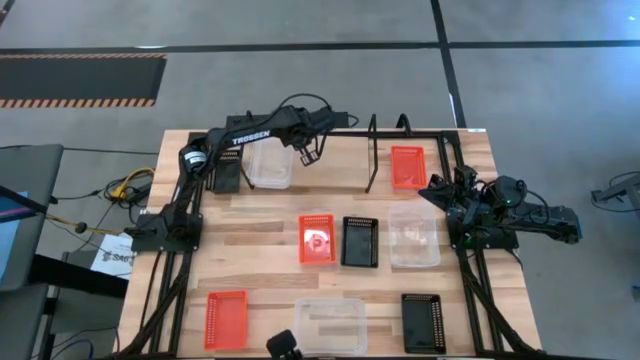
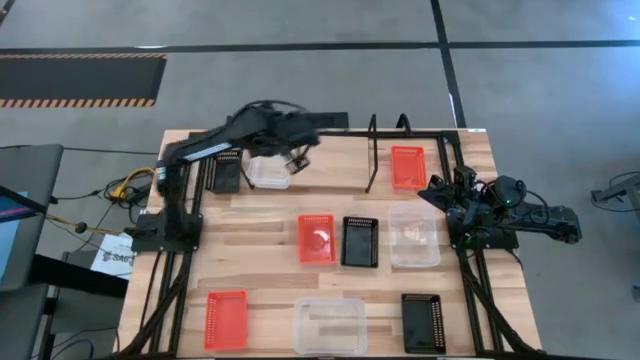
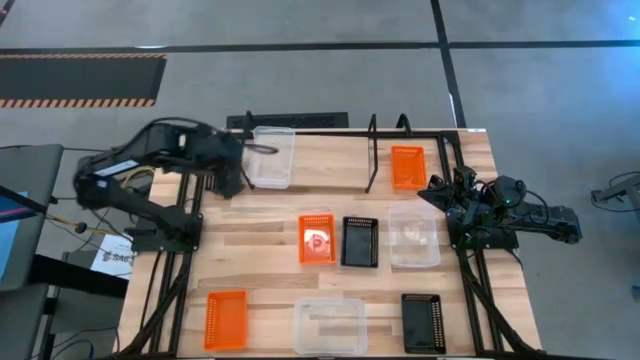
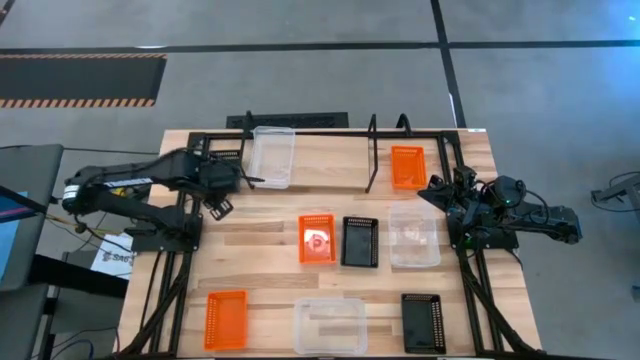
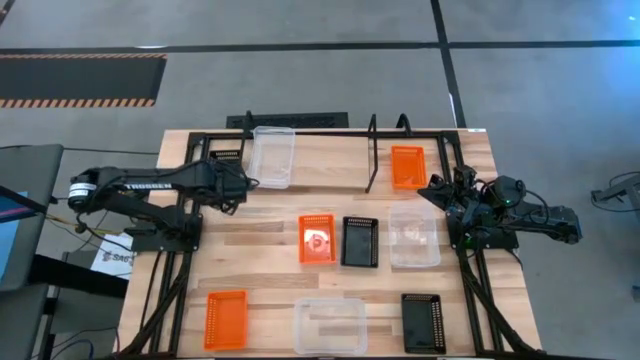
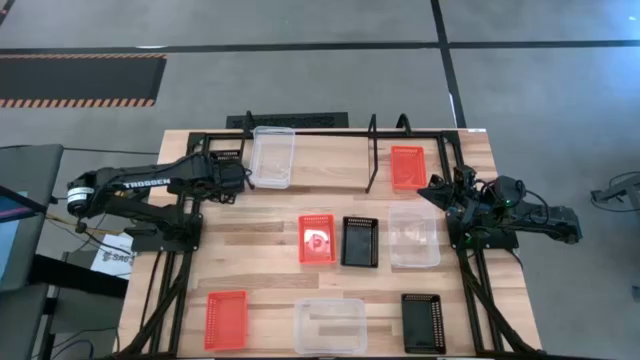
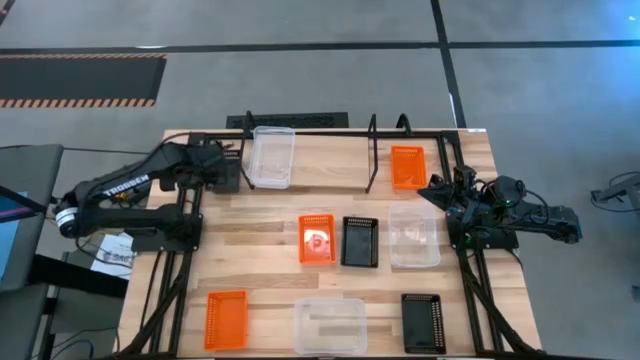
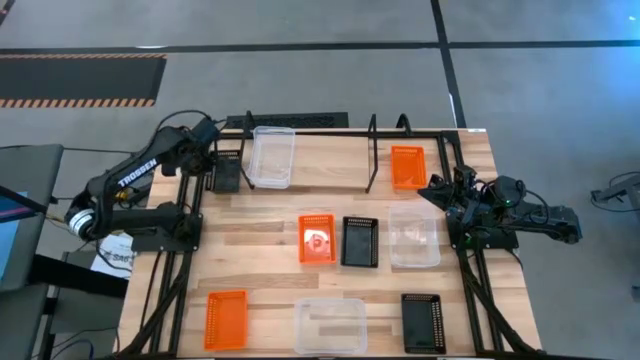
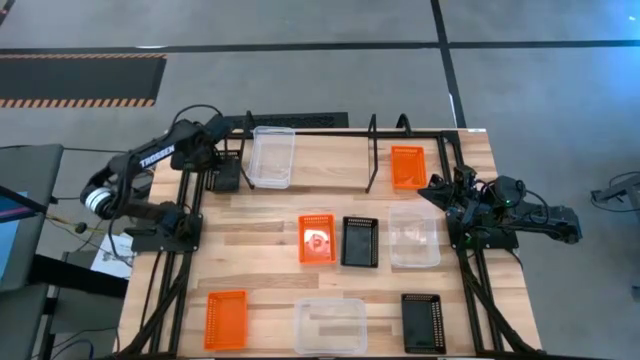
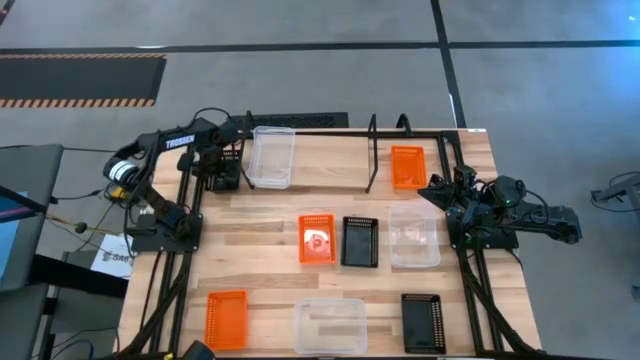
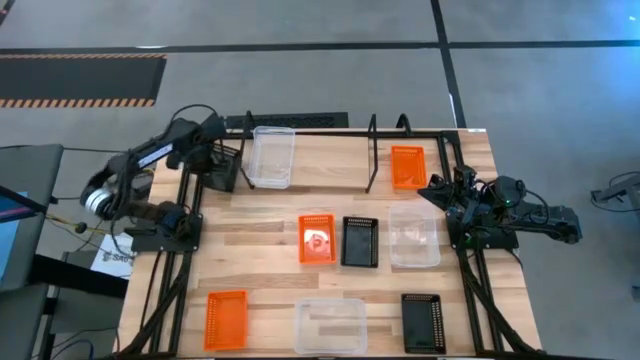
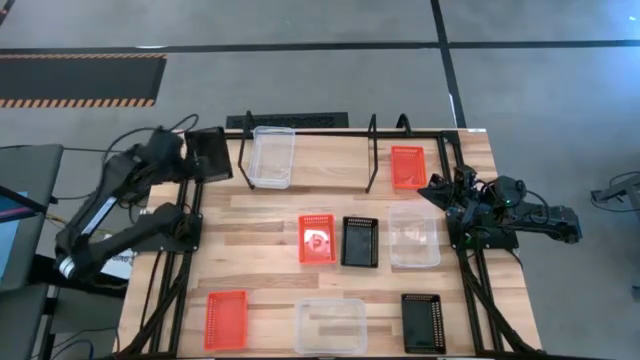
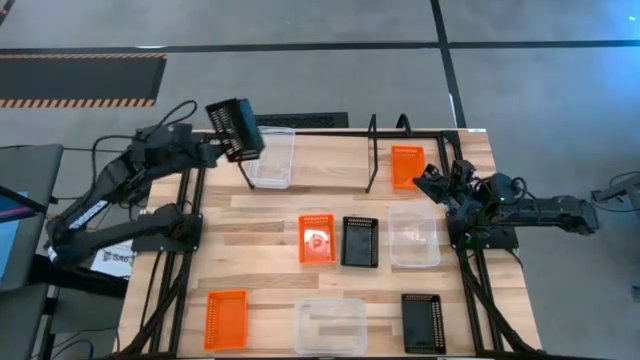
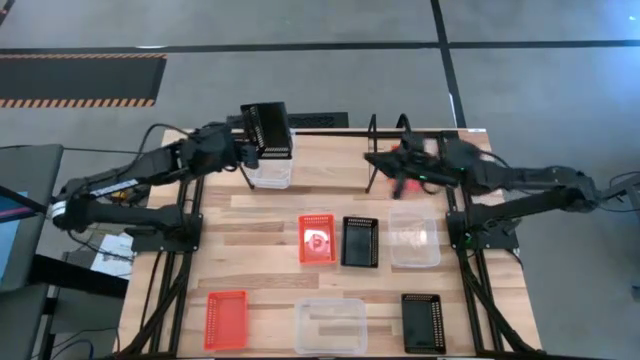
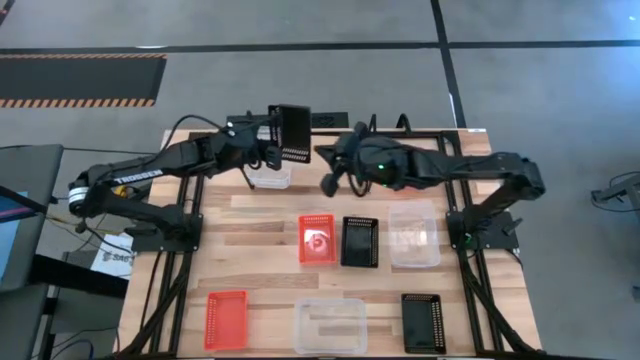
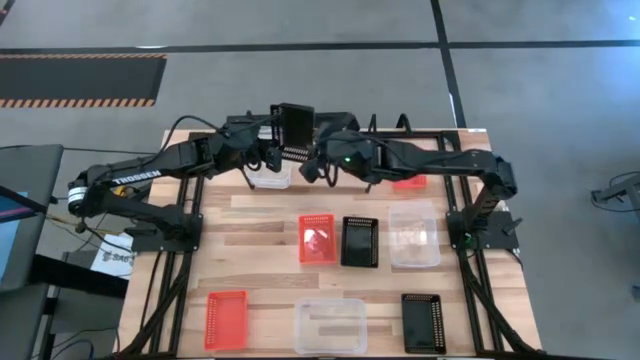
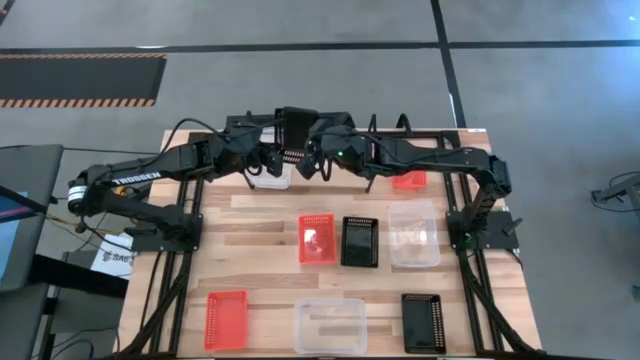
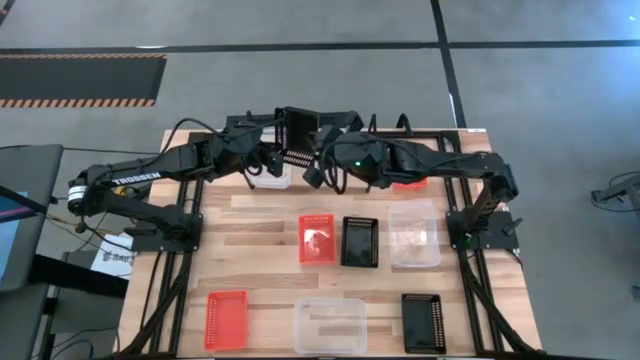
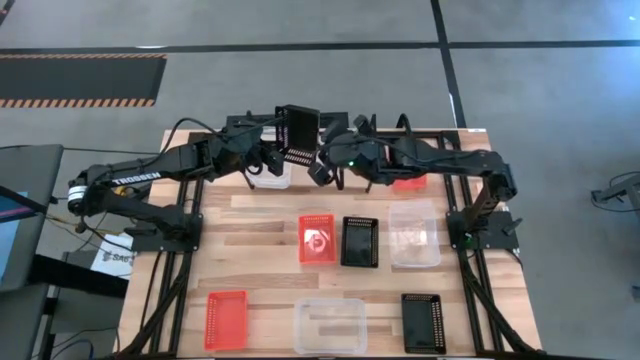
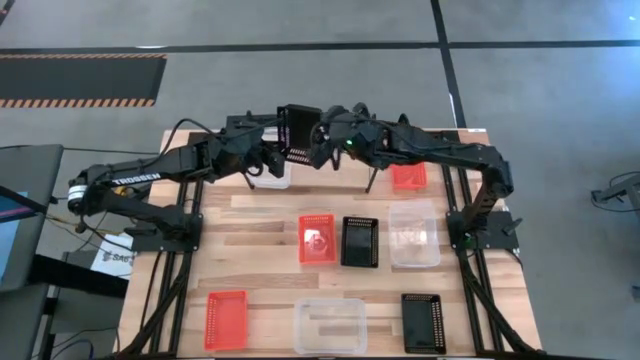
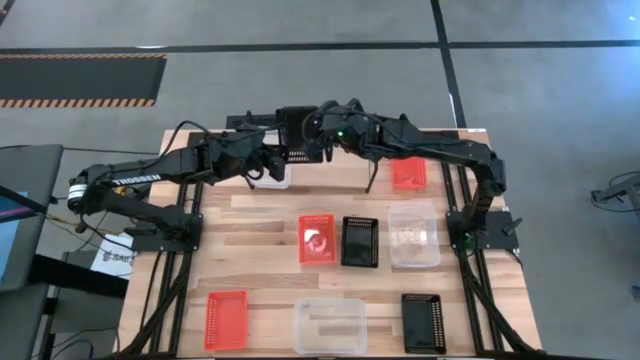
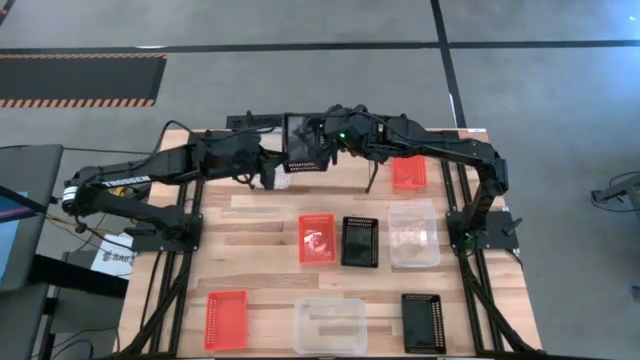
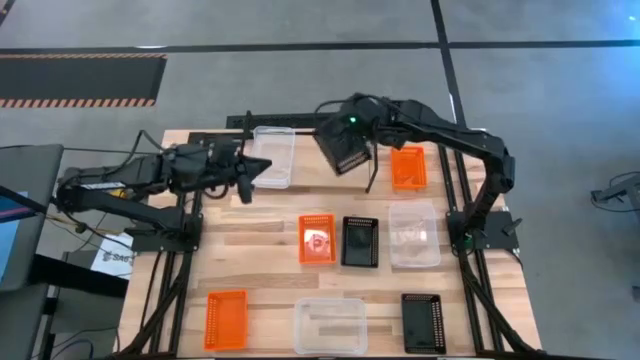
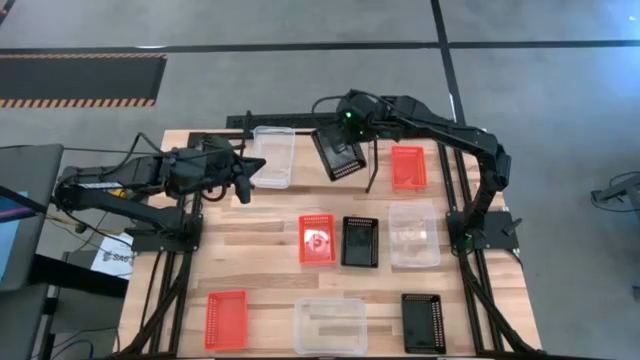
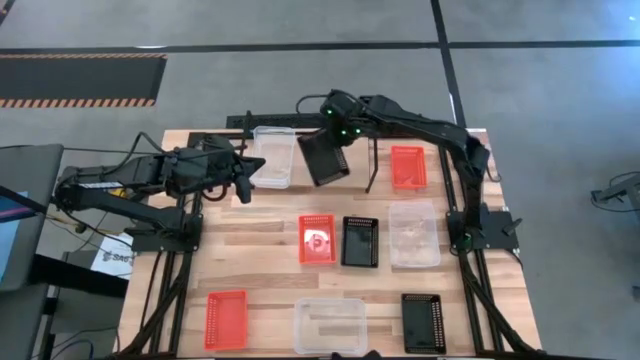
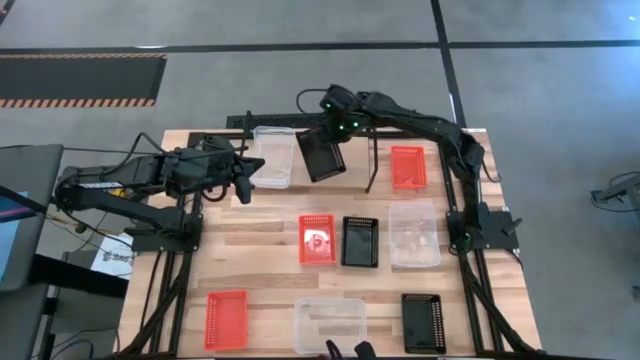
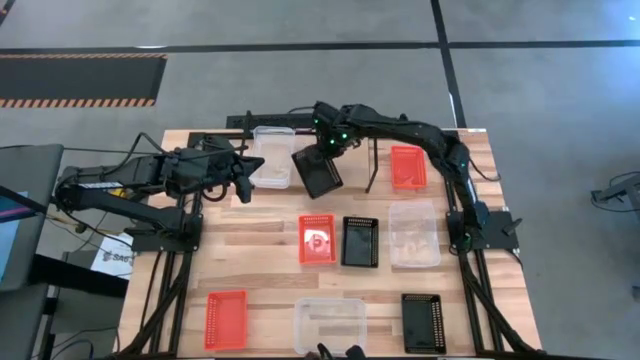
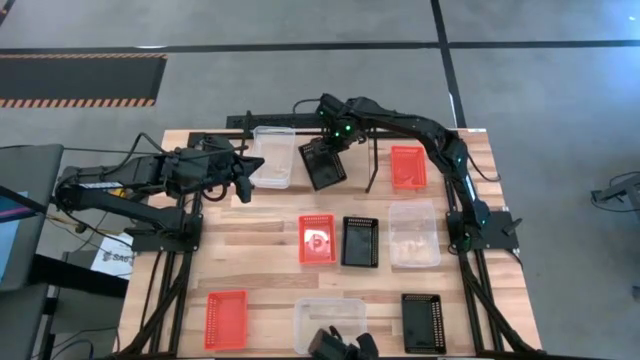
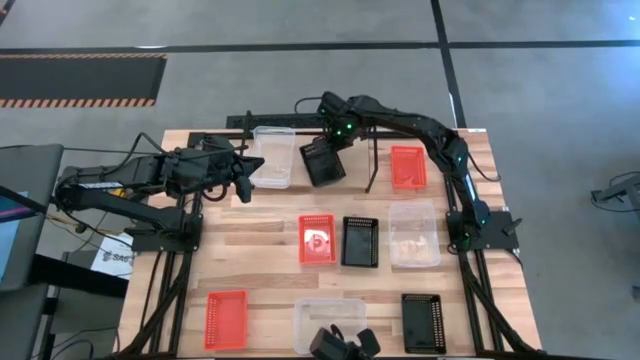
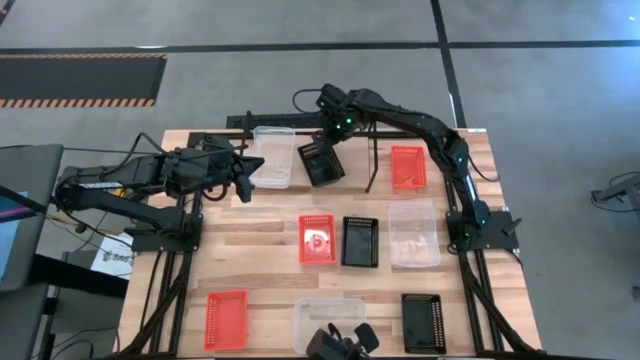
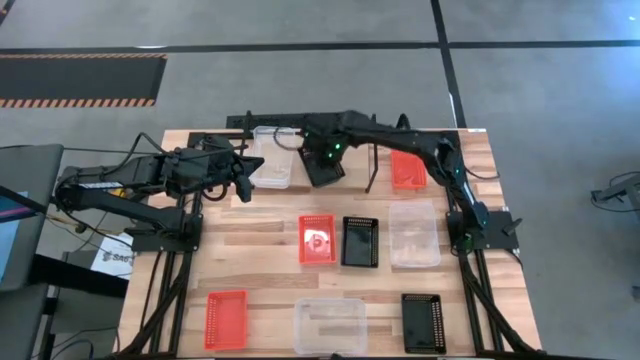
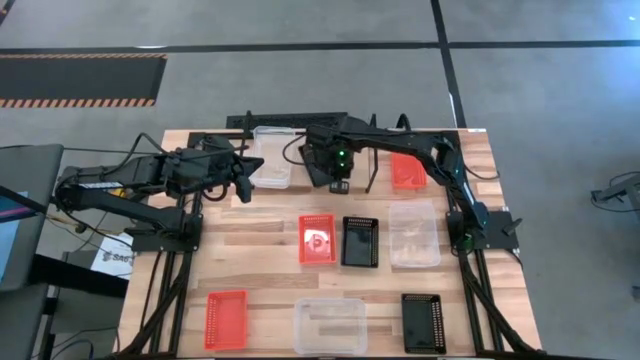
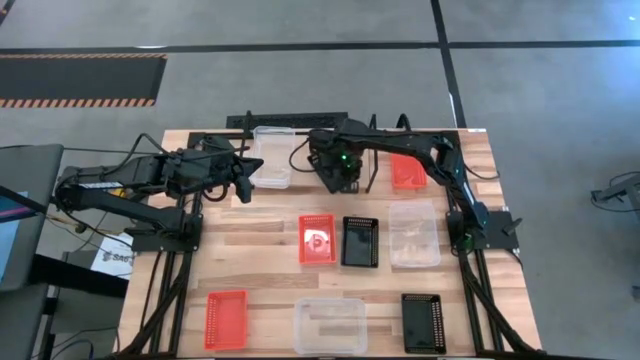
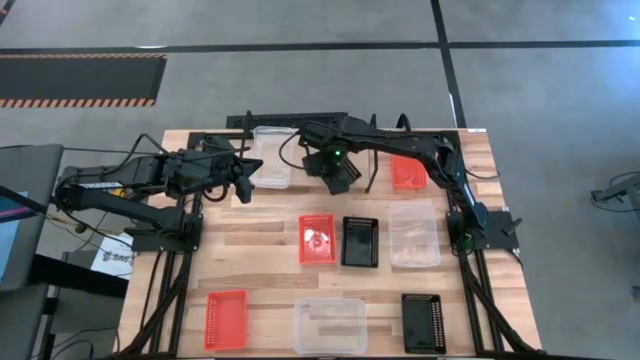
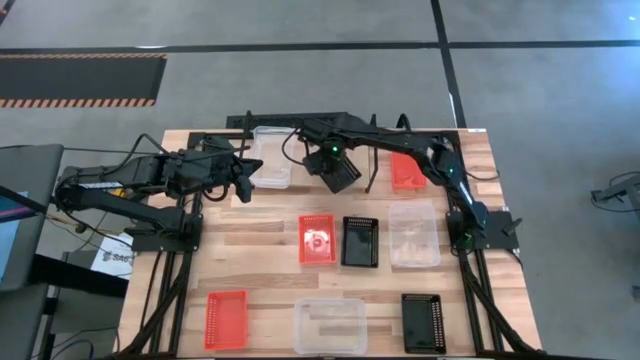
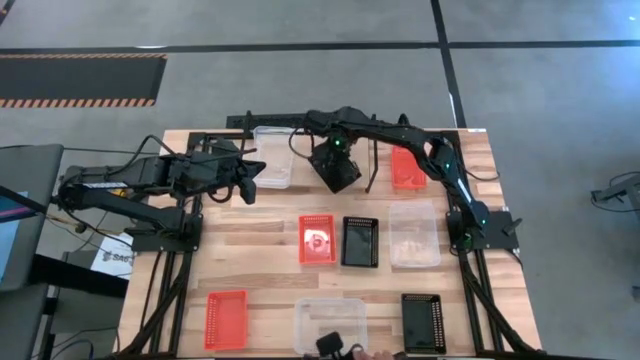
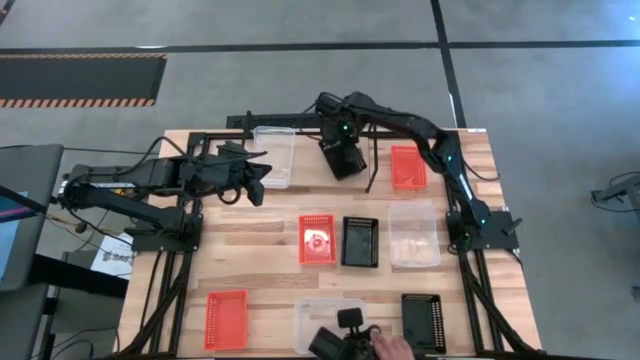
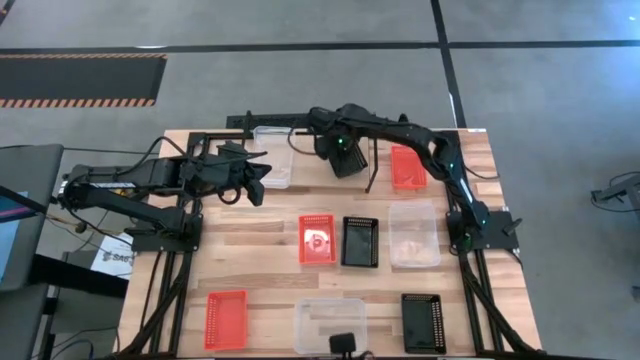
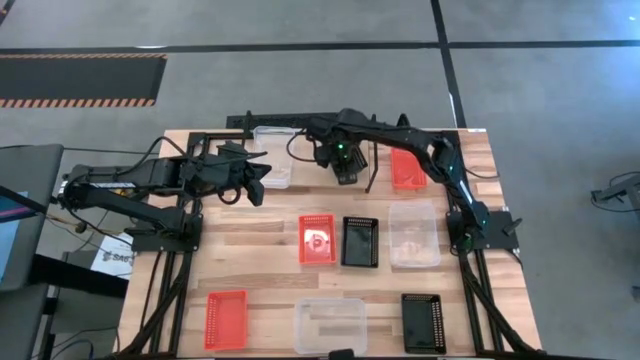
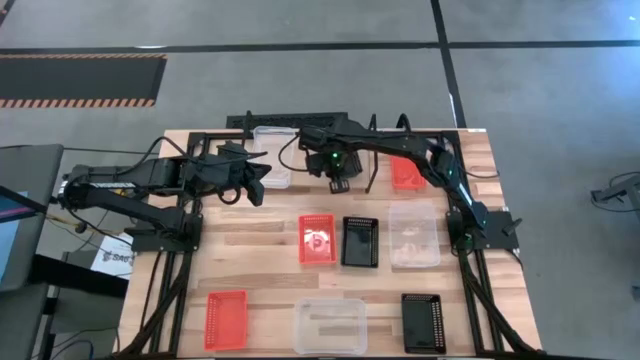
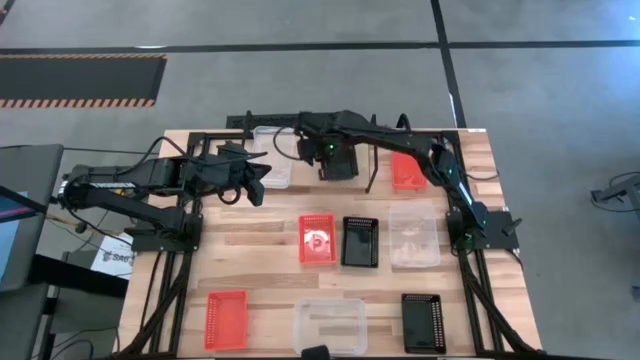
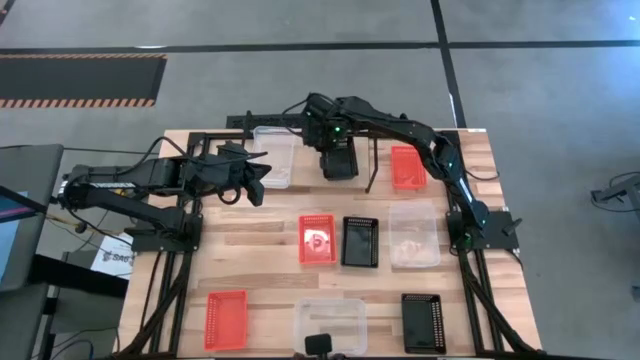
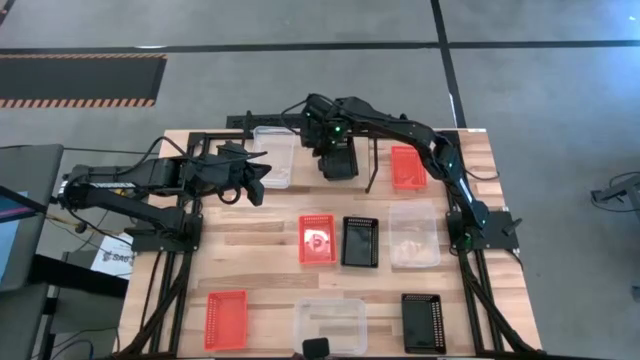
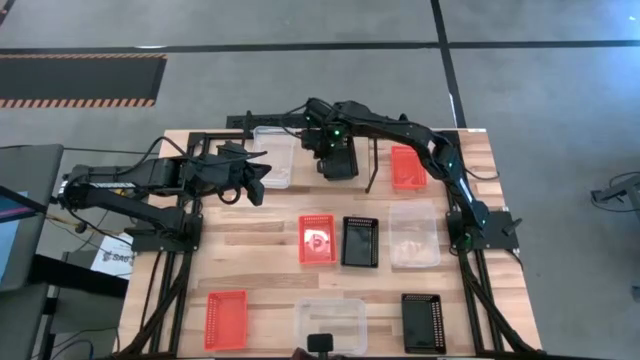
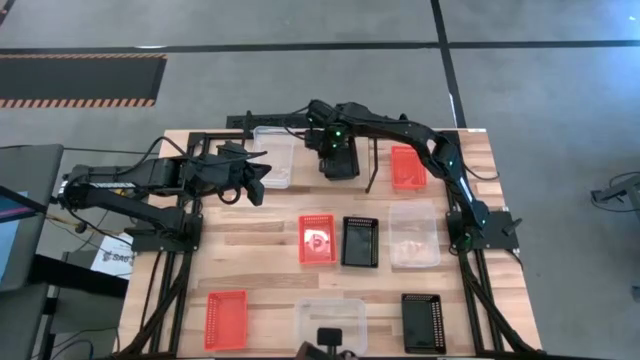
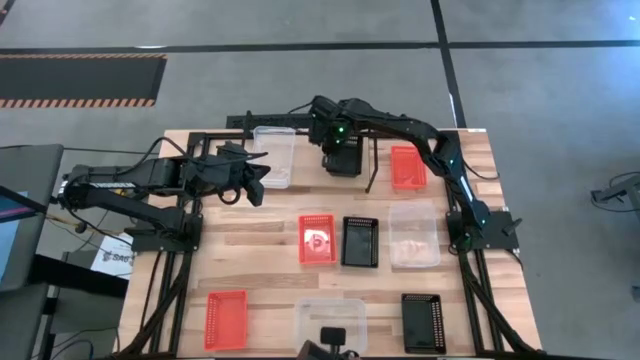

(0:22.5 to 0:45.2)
Task: Stack baskets on shelf by color
Put the top black bin on the shelf
